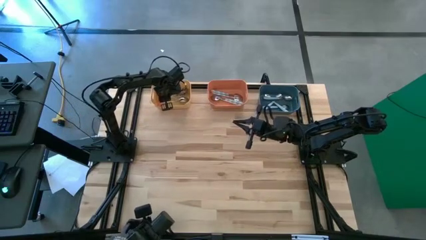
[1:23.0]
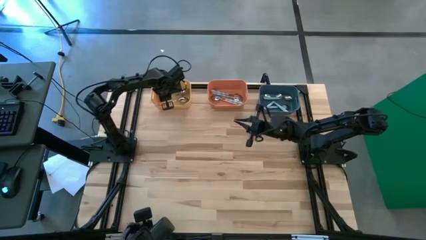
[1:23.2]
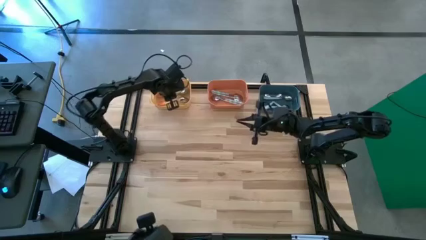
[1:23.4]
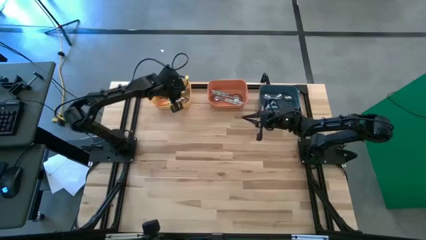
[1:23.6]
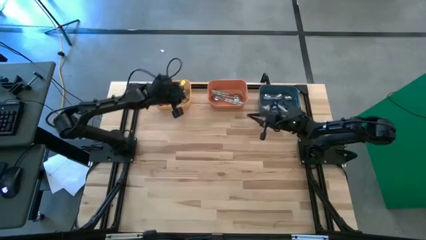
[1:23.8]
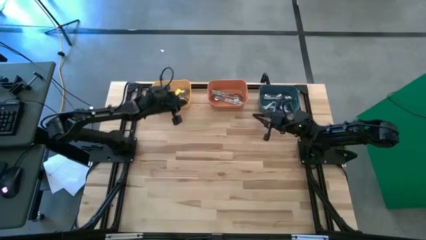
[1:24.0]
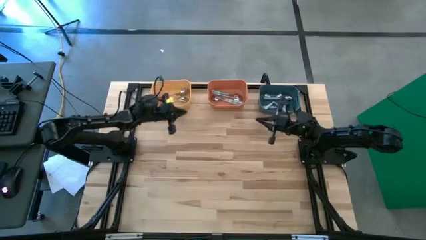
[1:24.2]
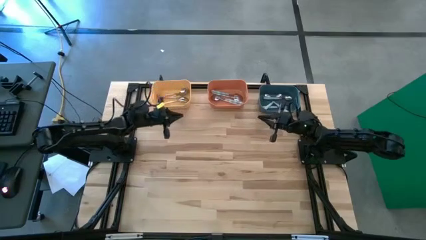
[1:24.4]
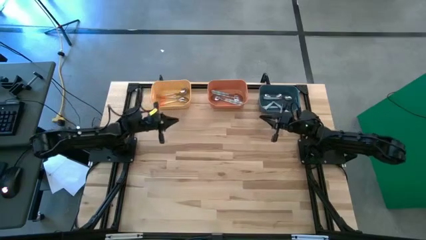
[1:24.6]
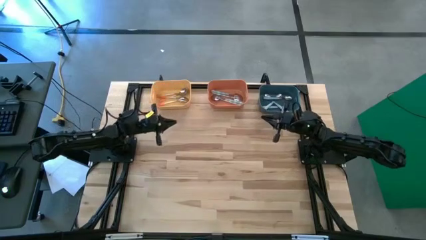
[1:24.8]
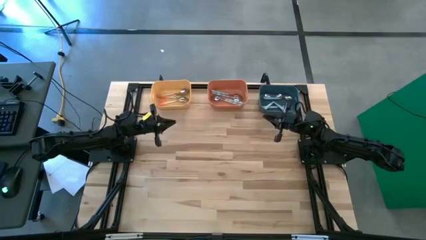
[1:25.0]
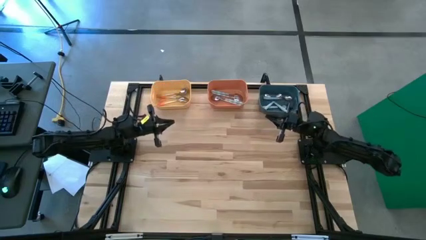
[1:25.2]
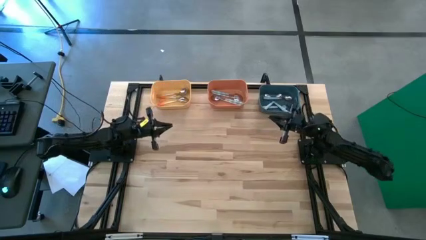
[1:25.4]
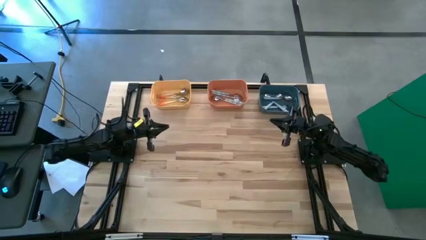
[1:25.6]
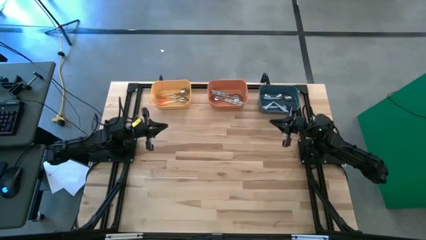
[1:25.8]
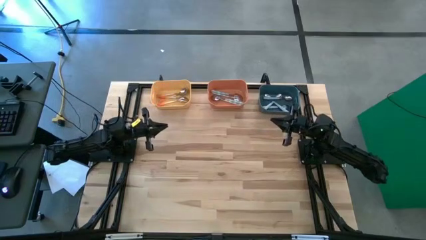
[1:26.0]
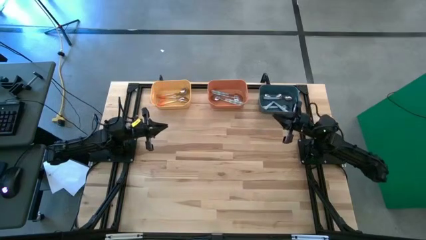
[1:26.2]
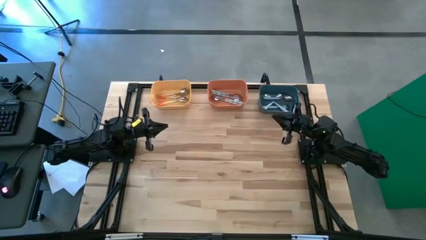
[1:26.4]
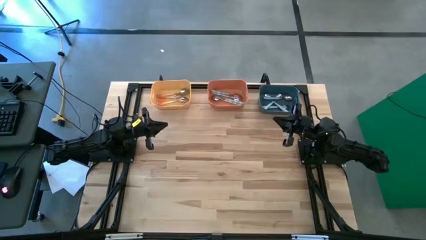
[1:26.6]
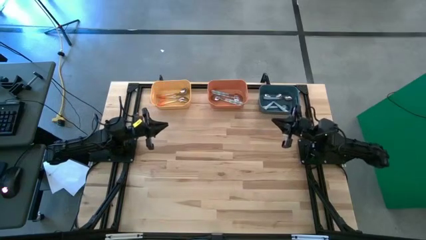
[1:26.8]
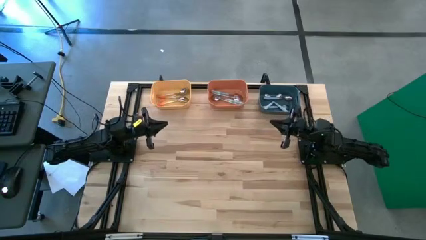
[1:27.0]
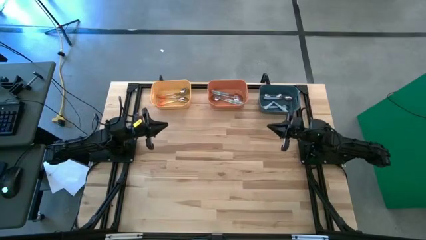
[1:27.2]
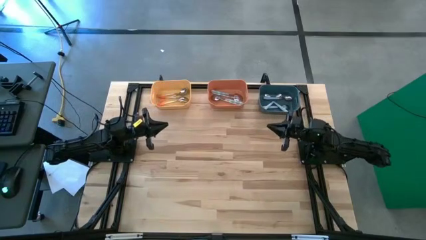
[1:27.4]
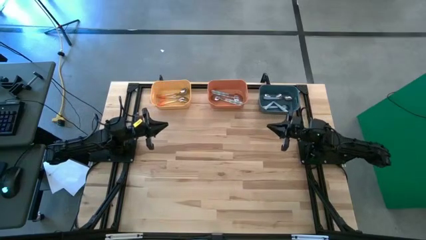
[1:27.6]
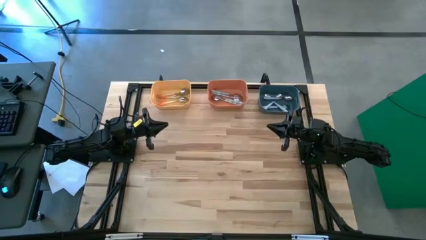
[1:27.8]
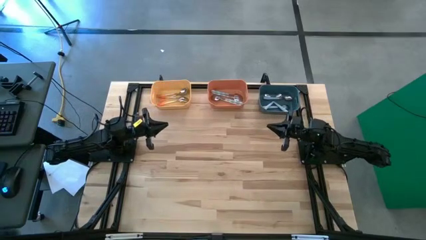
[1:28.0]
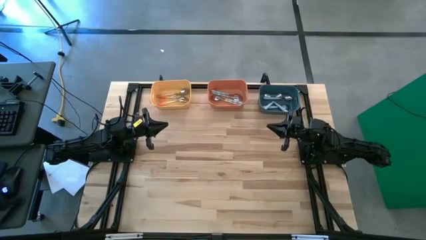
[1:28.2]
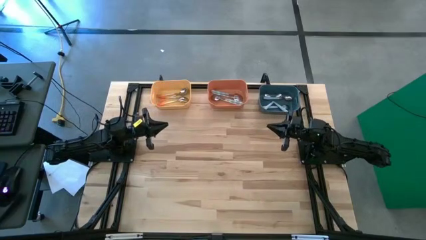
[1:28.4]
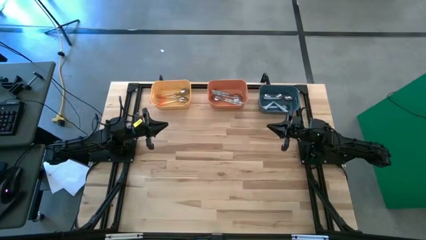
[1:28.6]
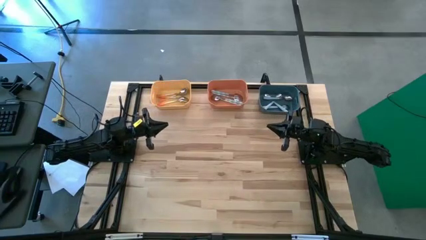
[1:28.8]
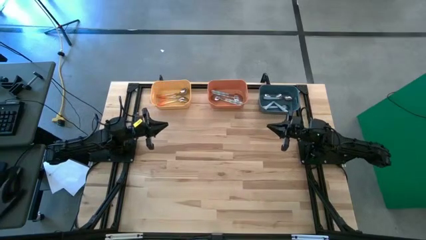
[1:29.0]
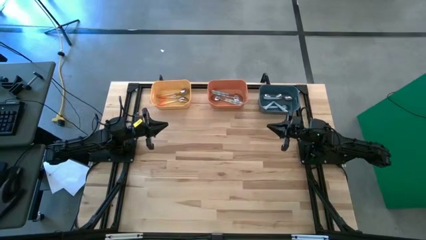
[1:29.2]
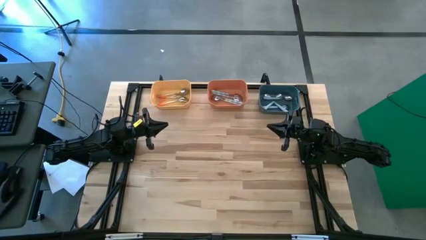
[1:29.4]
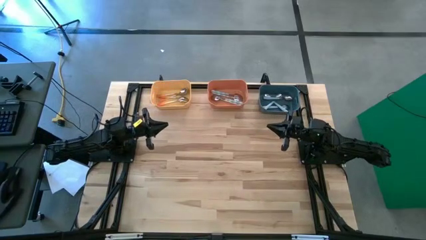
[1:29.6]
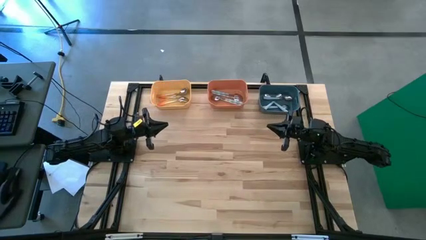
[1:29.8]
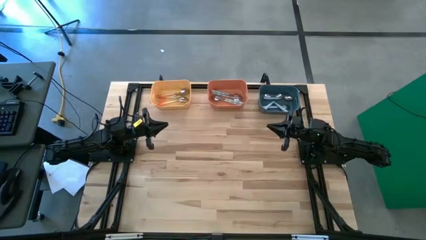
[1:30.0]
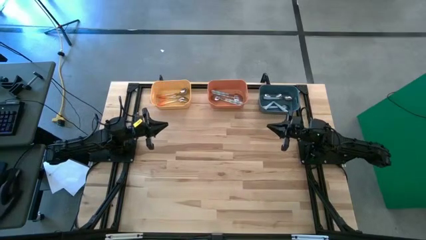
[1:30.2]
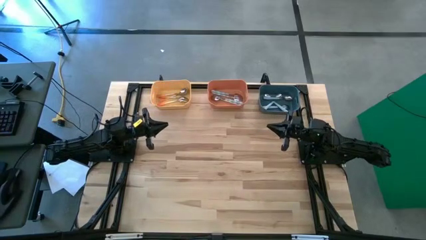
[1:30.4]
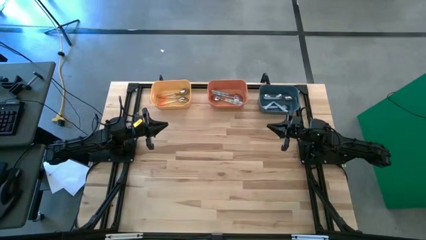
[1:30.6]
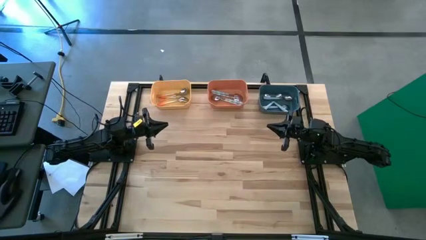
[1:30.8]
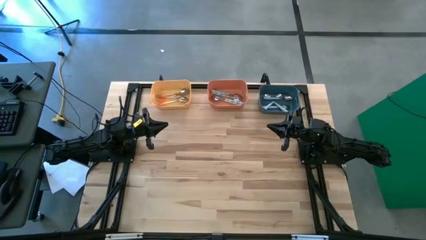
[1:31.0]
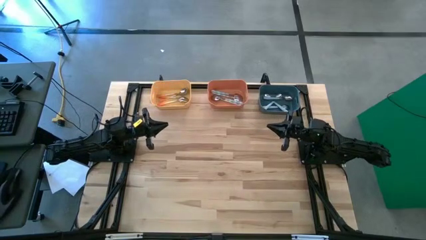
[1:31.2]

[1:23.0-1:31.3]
Task: Sort silverware by color (type)
Return to Home Position

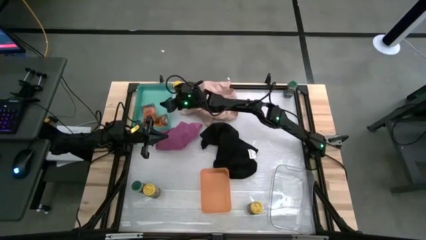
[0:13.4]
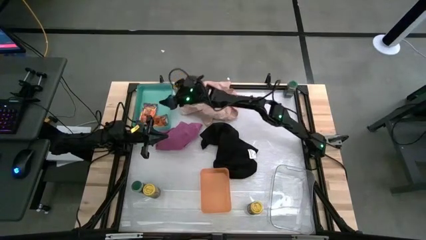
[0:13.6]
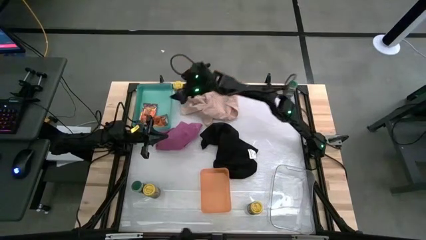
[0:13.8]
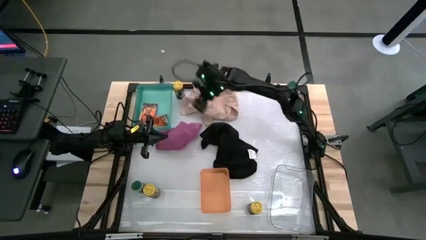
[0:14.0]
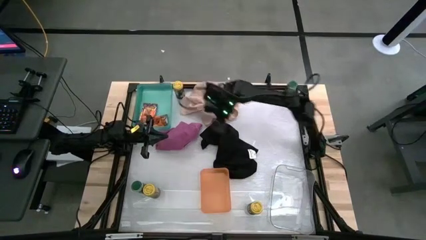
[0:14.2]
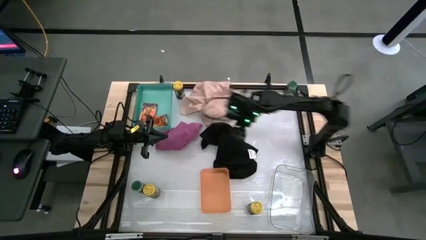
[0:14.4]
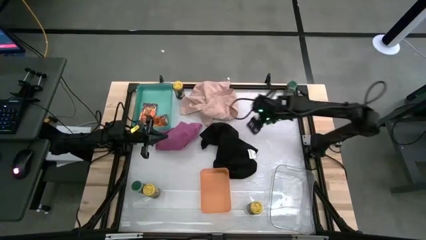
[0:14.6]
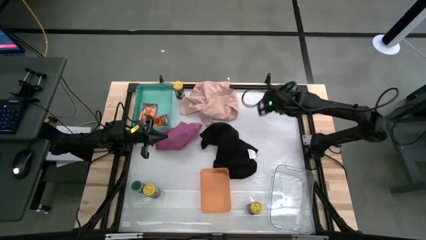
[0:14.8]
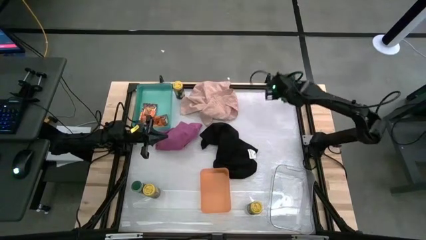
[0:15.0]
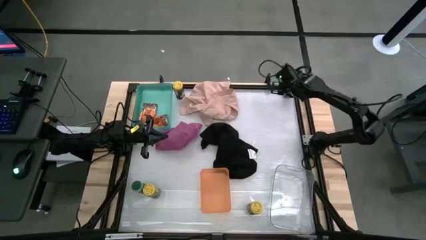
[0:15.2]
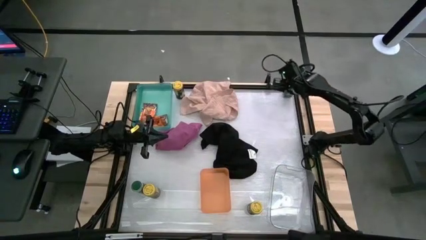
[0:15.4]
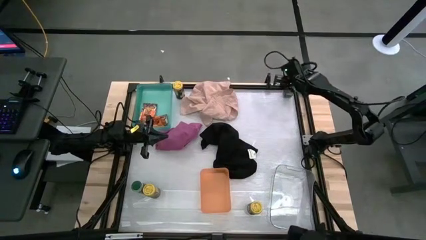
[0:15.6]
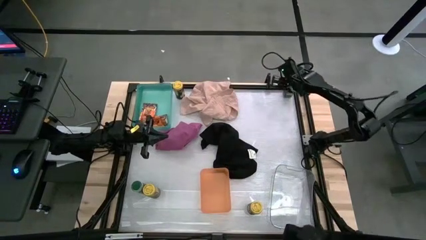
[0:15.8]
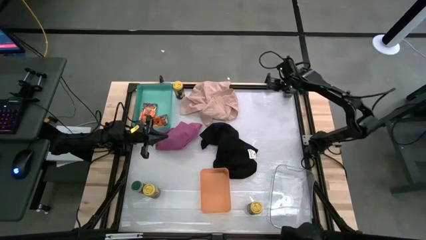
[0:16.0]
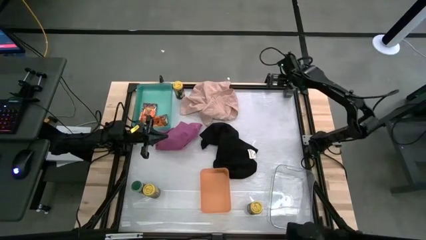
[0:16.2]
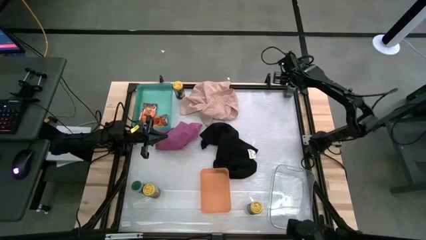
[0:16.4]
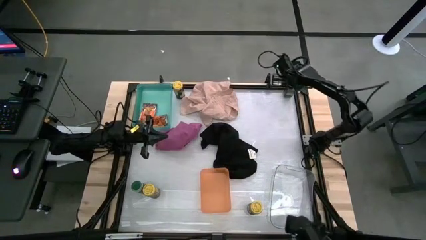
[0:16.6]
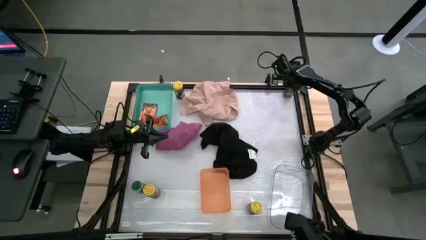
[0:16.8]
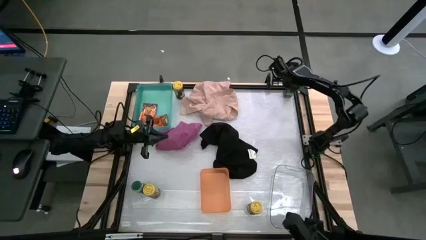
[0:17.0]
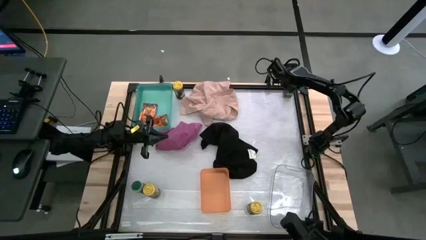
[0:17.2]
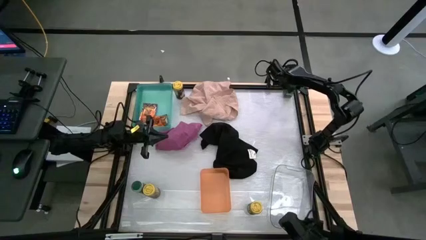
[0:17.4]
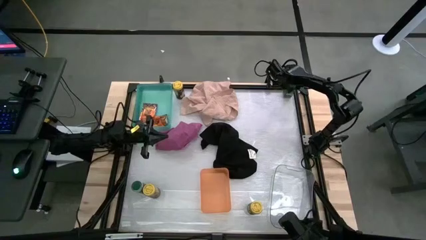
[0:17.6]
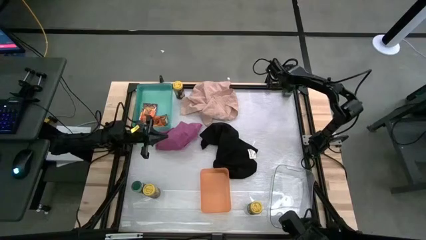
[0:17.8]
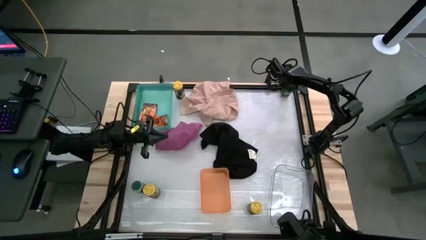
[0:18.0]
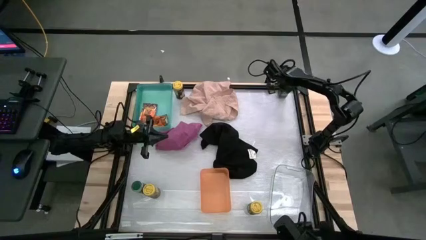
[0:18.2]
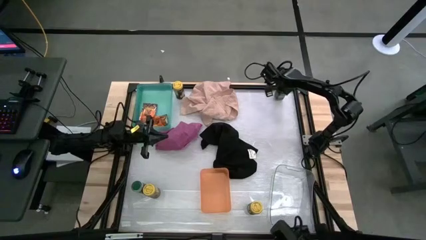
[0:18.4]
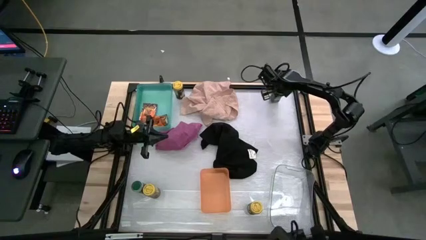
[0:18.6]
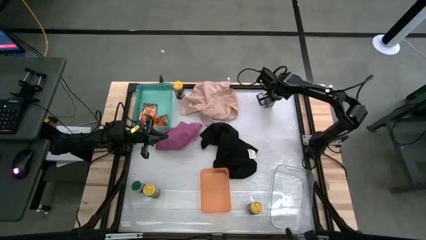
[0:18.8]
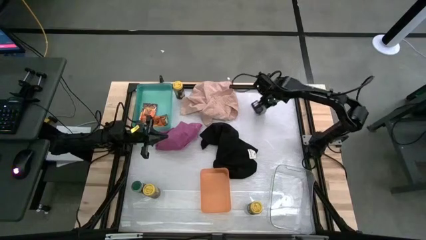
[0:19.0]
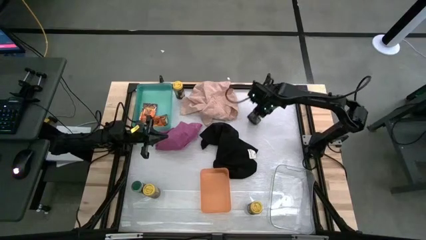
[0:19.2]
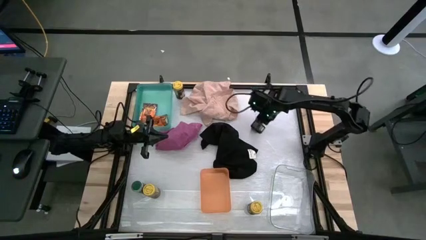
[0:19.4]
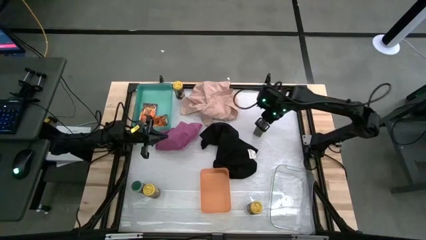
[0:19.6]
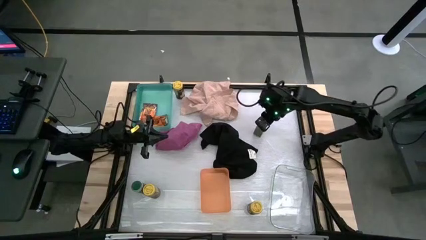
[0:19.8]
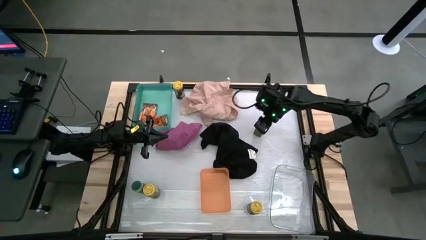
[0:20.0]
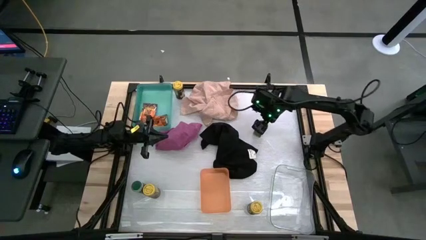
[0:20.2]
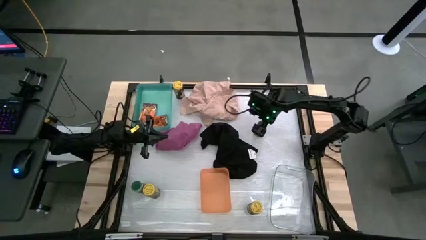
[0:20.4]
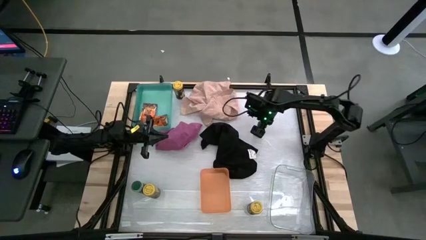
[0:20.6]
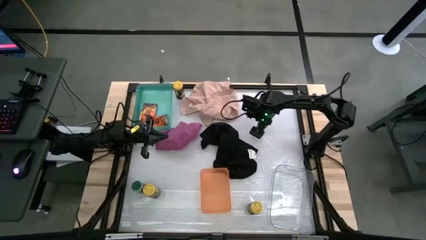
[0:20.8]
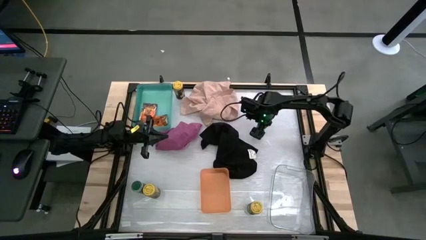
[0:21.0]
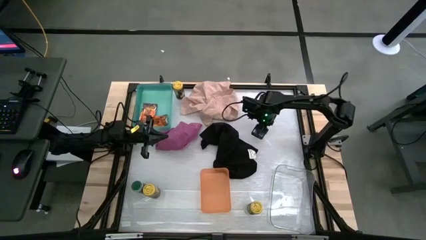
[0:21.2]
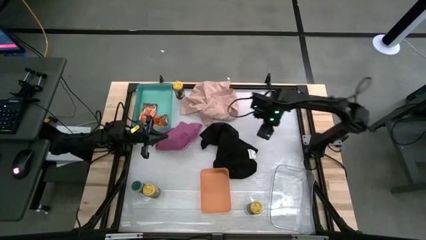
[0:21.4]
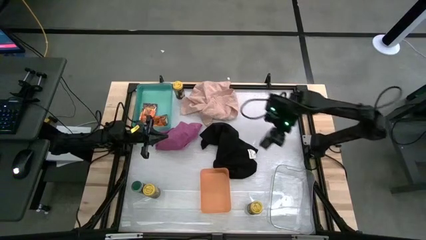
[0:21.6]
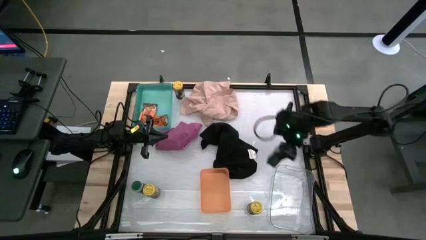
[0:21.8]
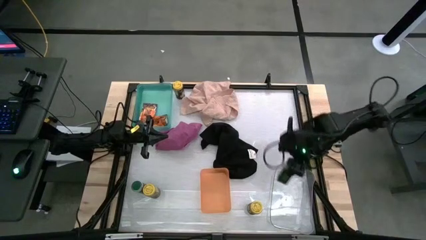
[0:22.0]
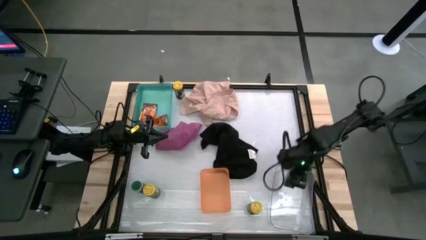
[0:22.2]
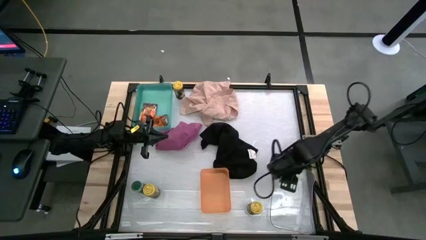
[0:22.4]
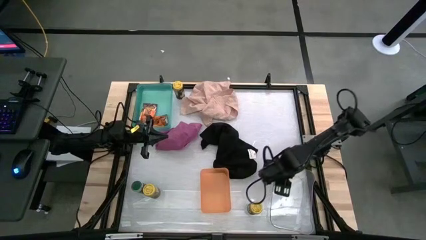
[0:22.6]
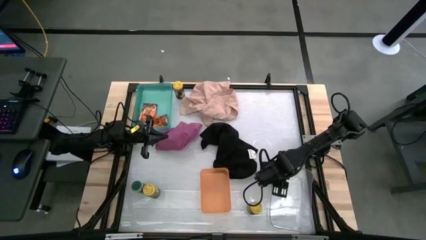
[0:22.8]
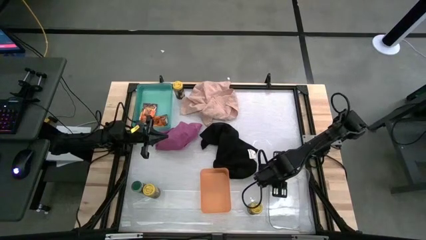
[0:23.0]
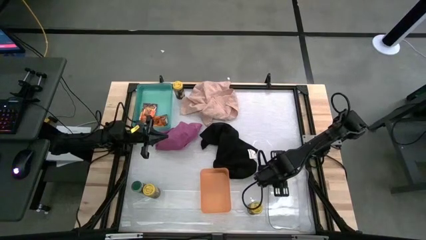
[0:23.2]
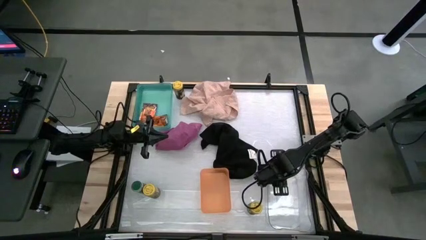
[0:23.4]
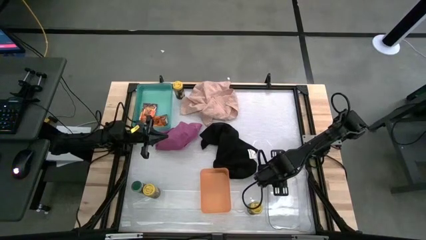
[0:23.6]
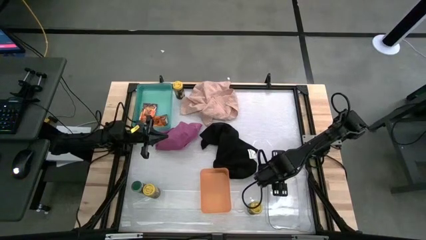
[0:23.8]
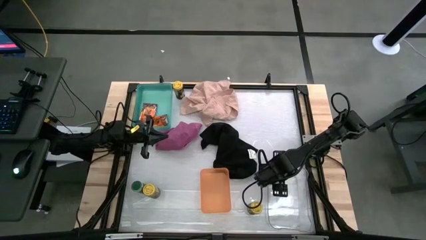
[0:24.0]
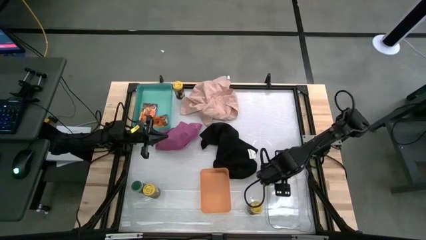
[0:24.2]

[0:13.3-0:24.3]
Task: Sort spices by type
Put the top green seasoning bottle into the transparent bin
